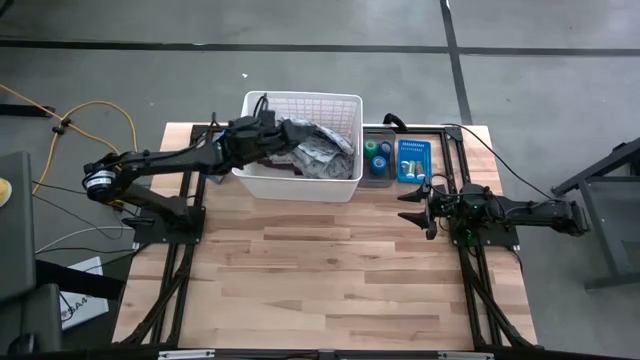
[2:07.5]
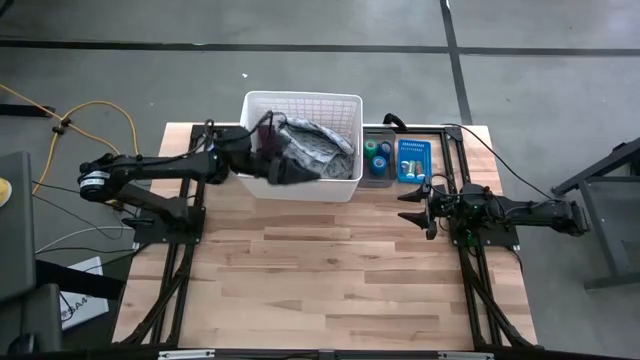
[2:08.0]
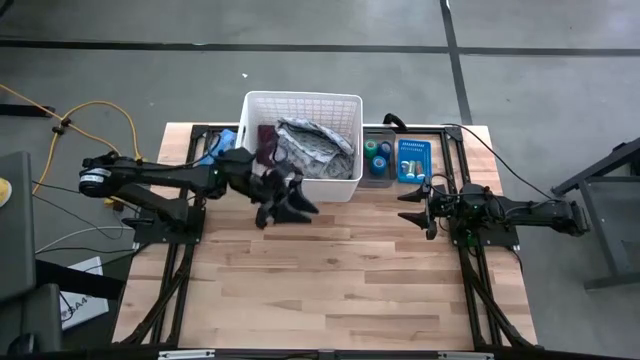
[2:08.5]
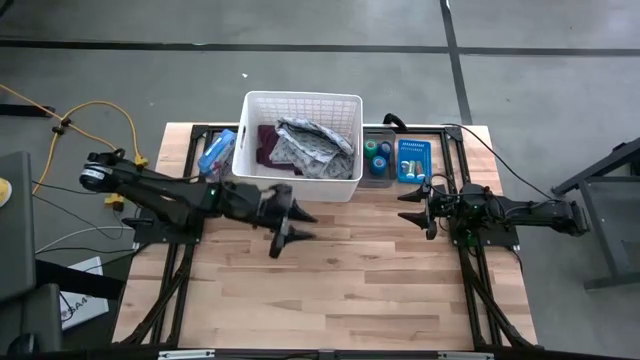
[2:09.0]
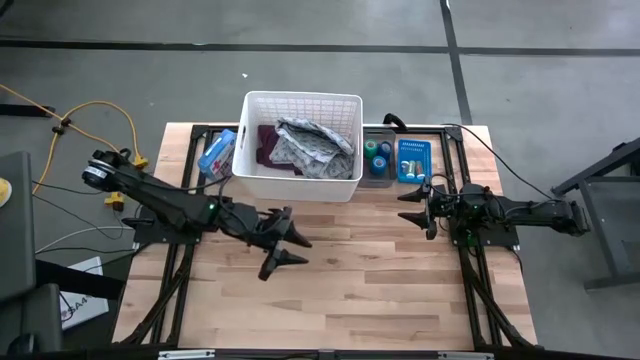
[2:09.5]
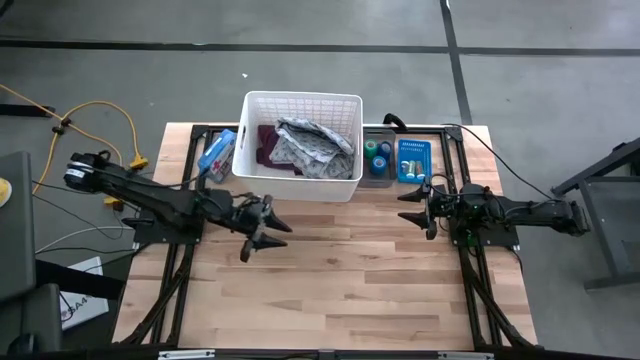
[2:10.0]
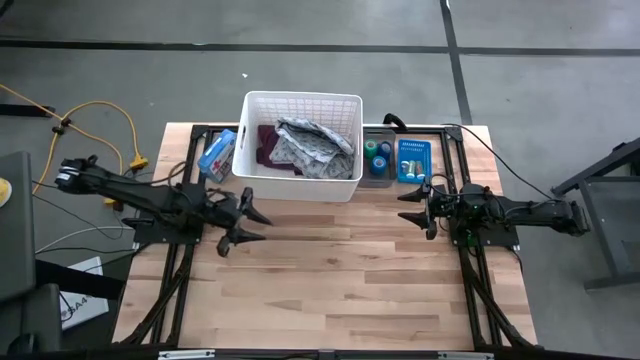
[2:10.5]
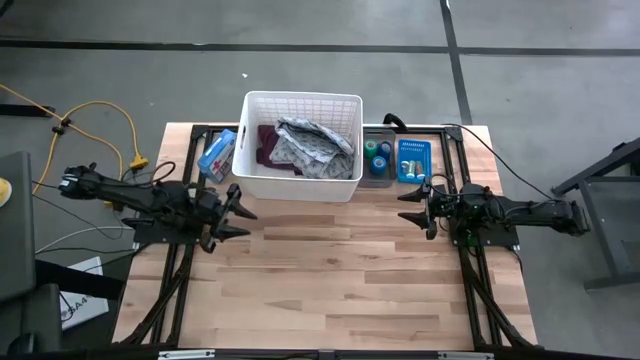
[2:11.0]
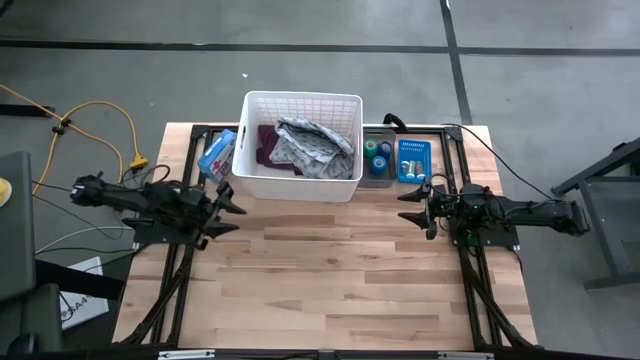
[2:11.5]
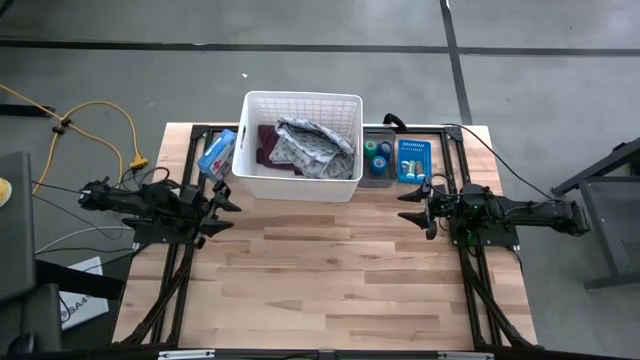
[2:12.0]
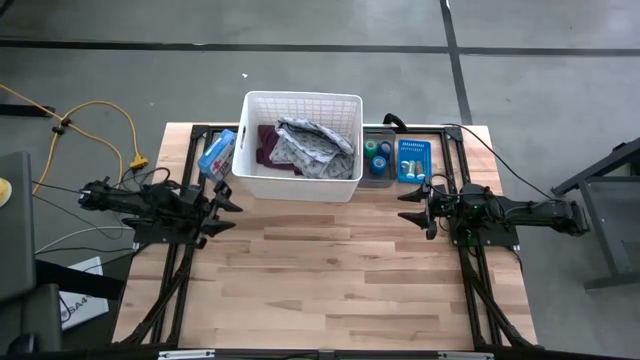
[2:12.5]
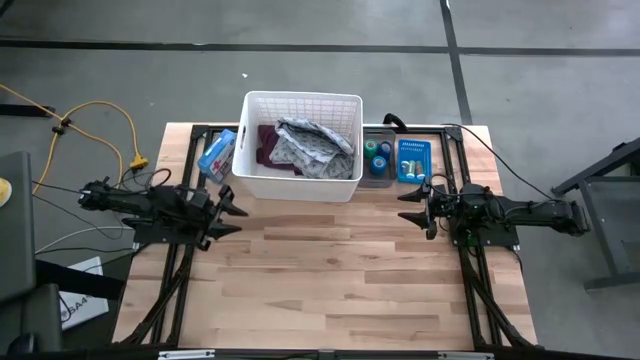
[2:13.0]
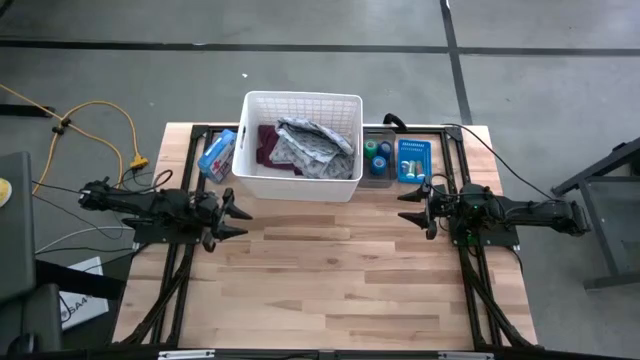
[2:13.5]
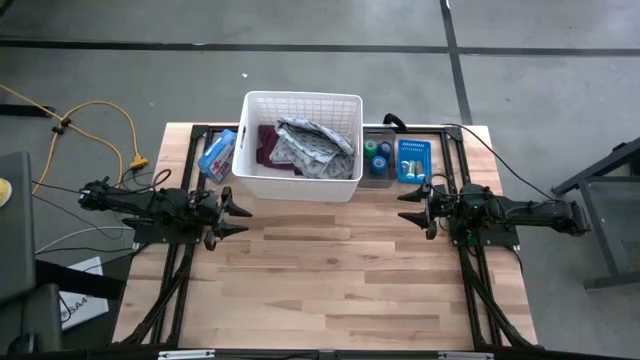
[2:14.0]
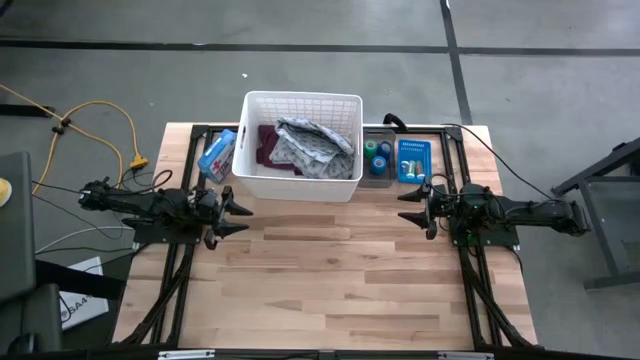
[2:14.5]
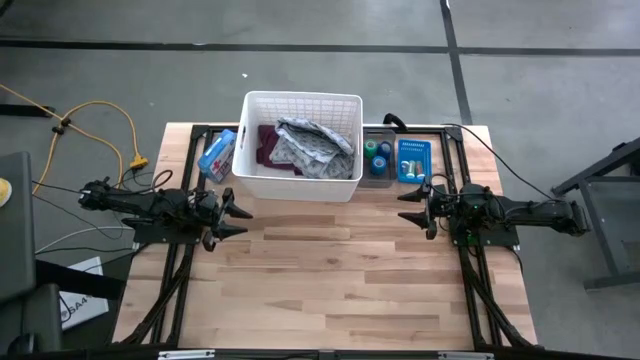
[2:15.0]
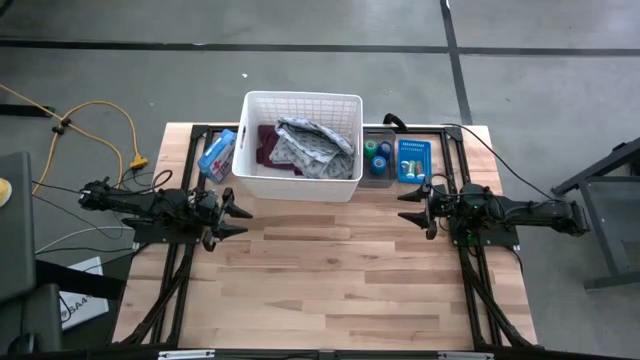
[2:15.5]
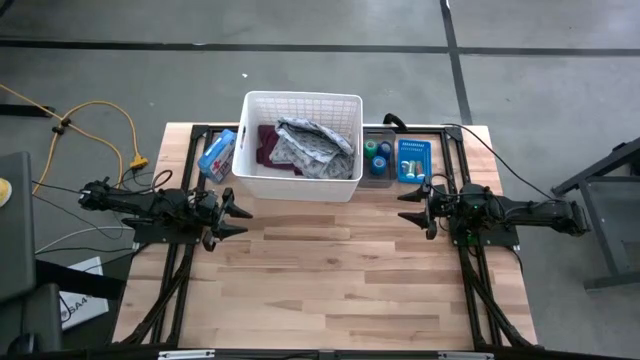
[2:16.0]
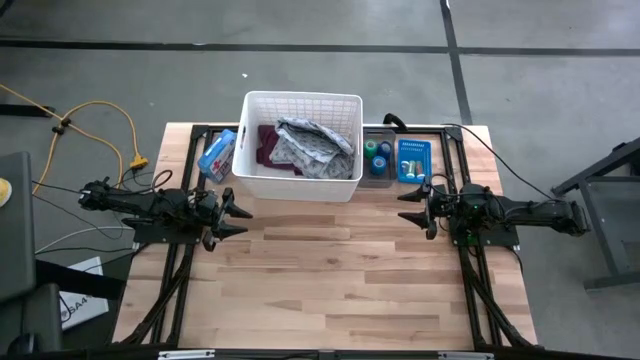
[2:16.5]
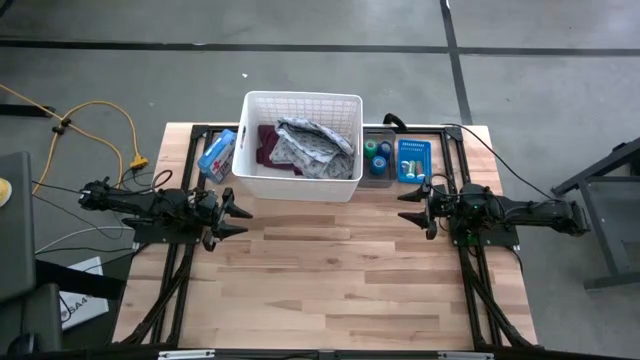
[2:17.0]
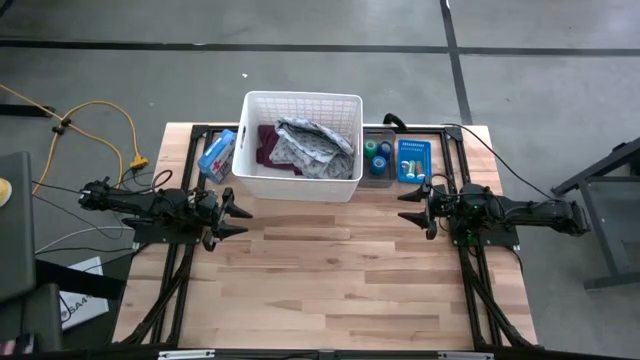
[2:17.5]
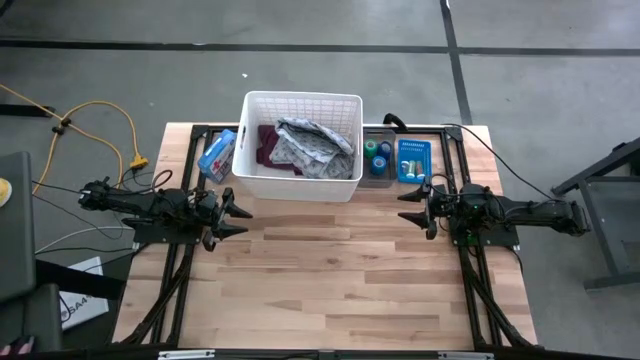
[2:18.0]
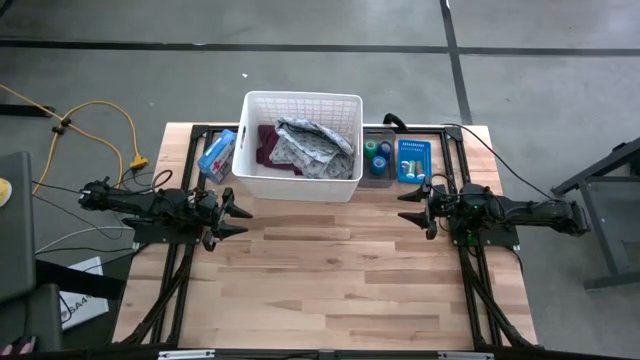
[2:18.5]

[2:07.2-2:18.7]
Task: Pick & Place Medicine items
Return to Home Position

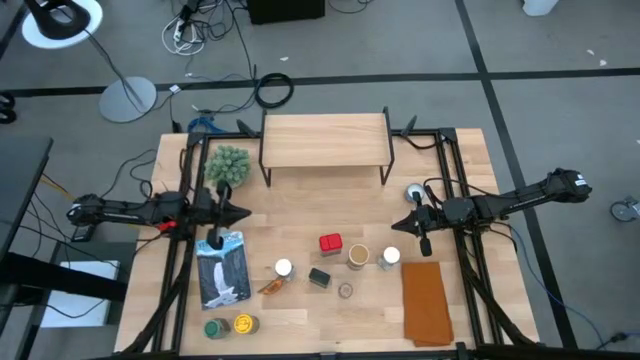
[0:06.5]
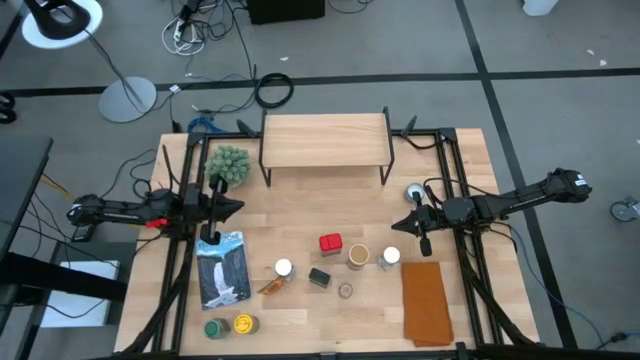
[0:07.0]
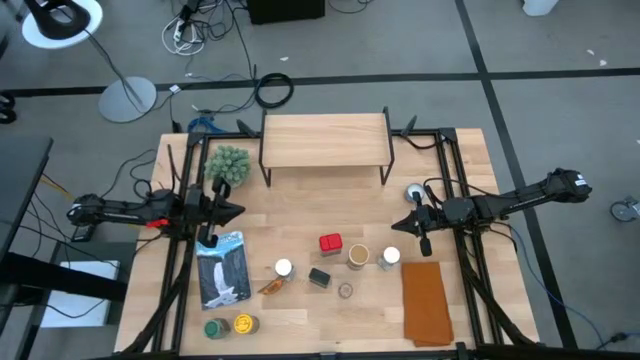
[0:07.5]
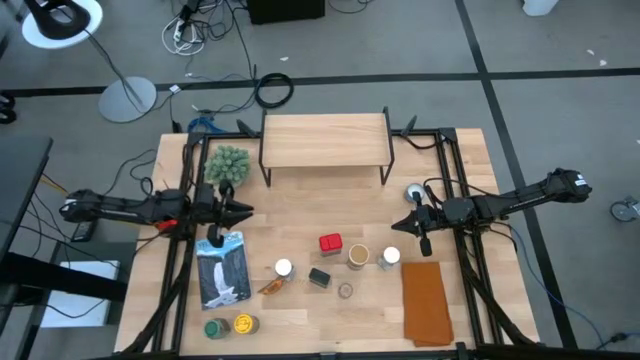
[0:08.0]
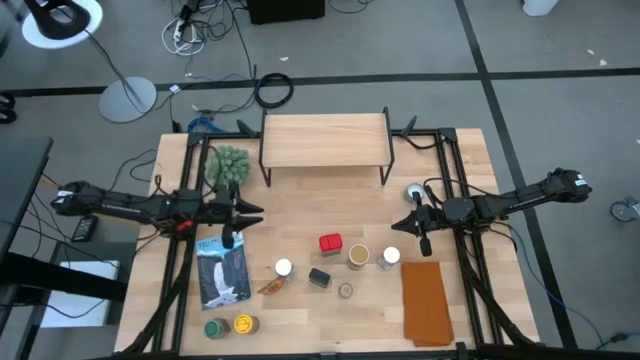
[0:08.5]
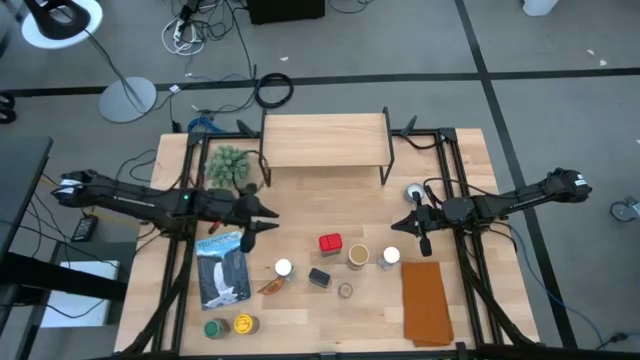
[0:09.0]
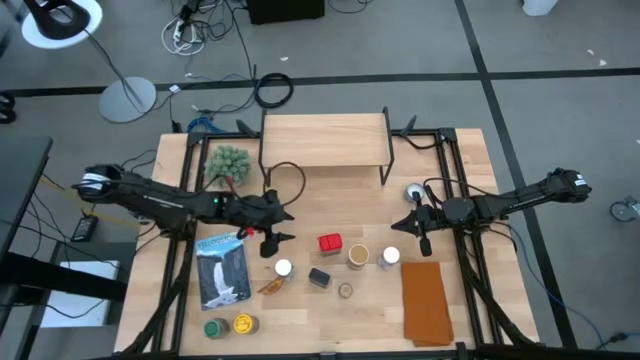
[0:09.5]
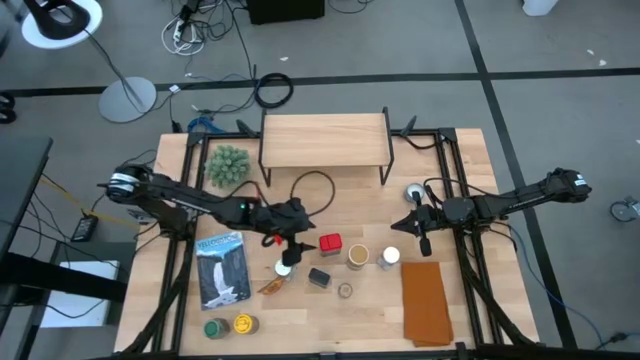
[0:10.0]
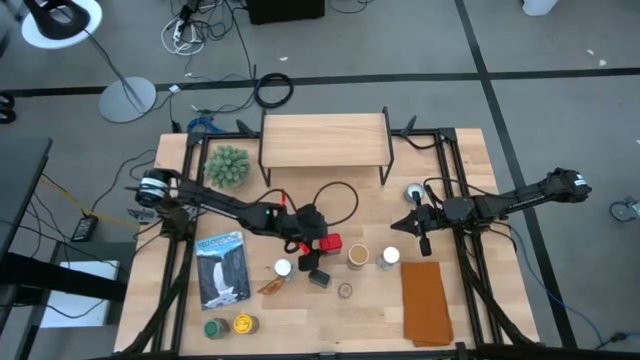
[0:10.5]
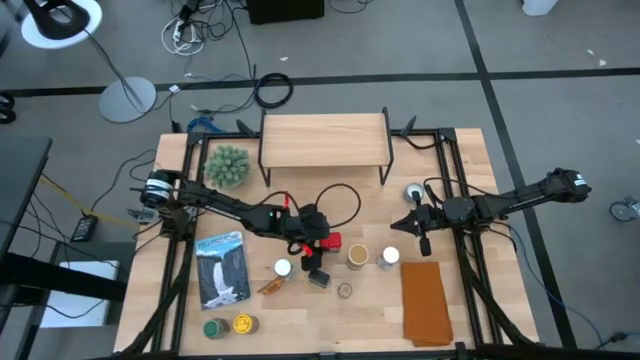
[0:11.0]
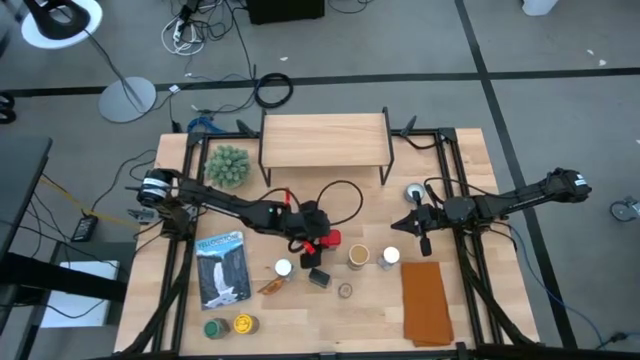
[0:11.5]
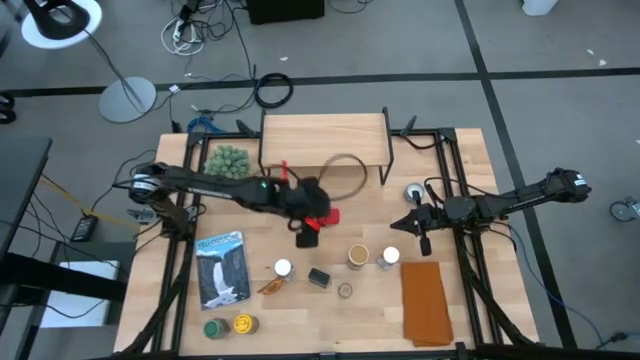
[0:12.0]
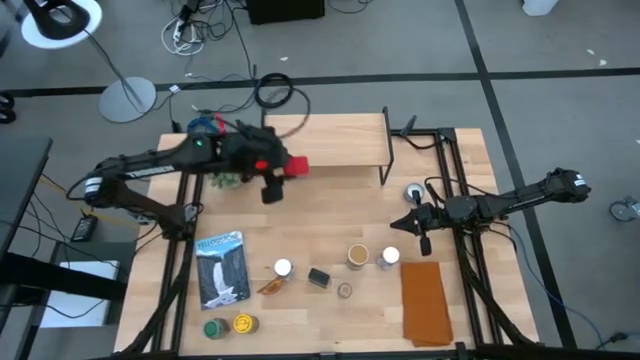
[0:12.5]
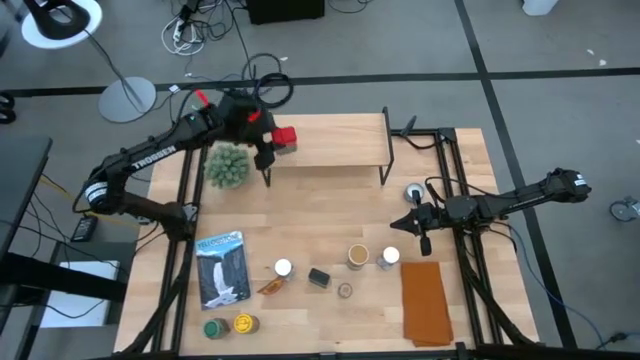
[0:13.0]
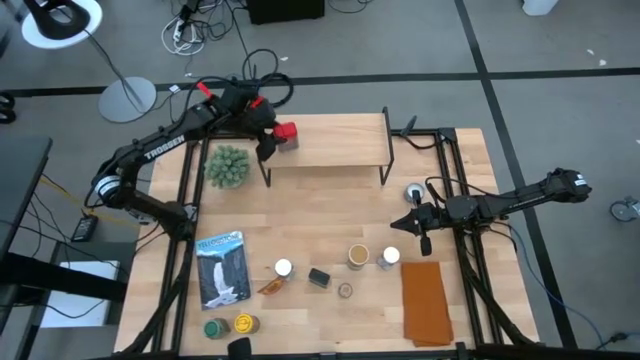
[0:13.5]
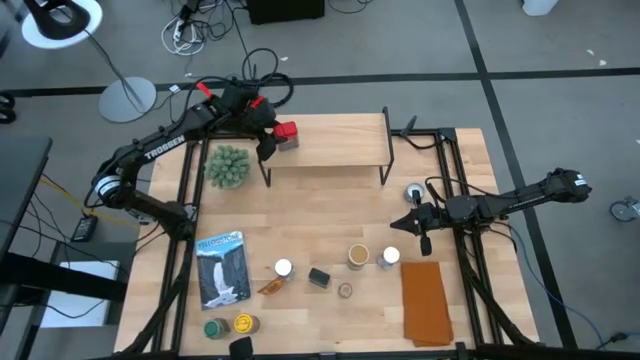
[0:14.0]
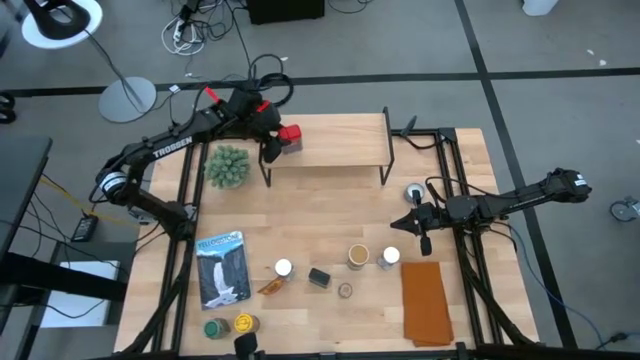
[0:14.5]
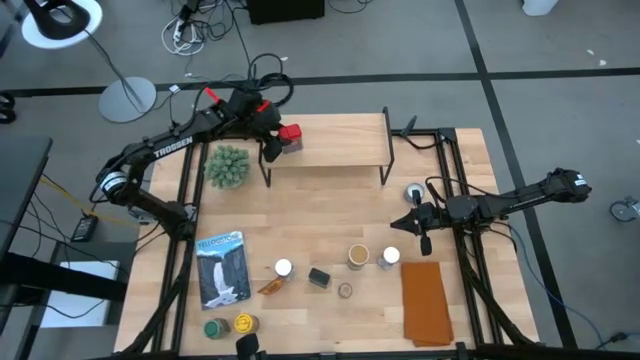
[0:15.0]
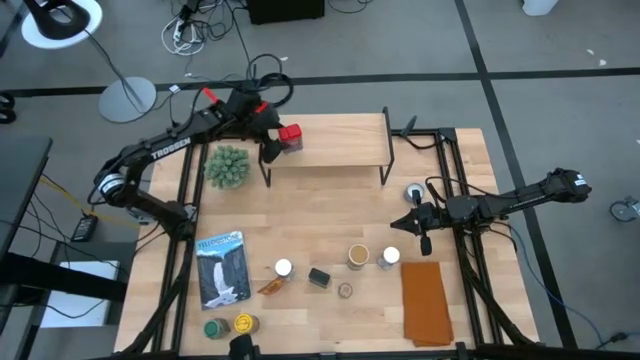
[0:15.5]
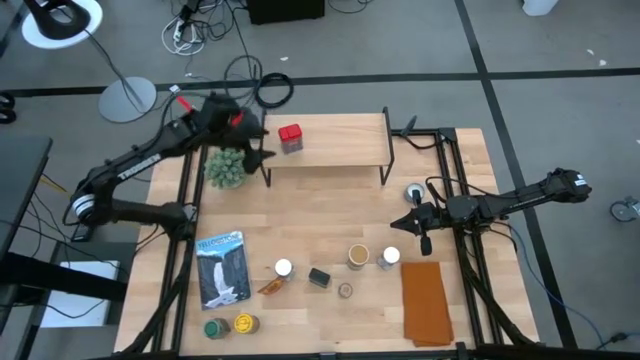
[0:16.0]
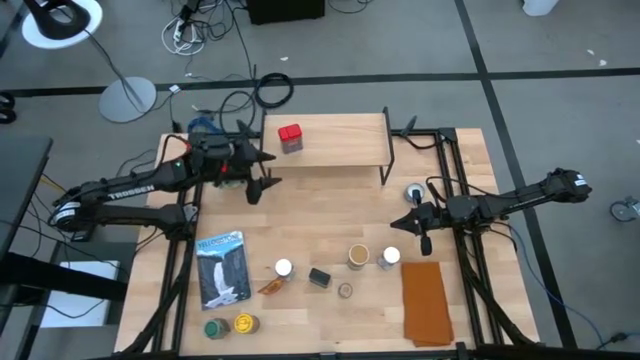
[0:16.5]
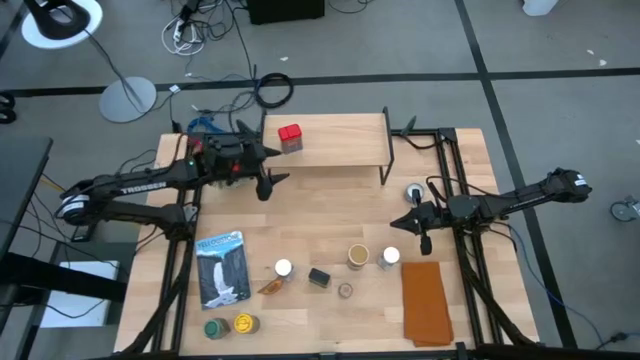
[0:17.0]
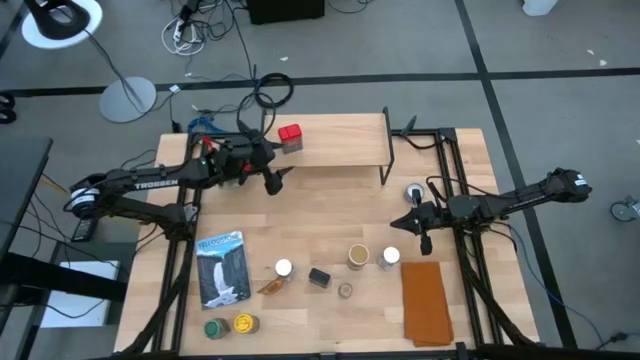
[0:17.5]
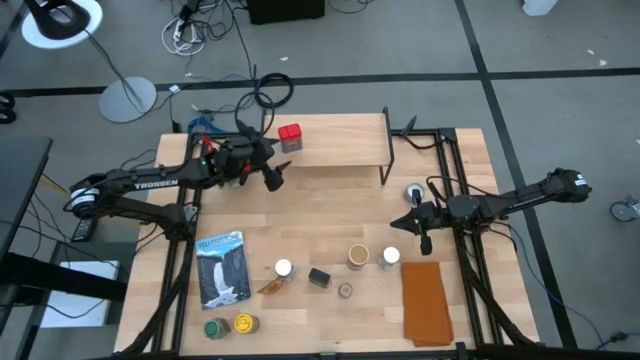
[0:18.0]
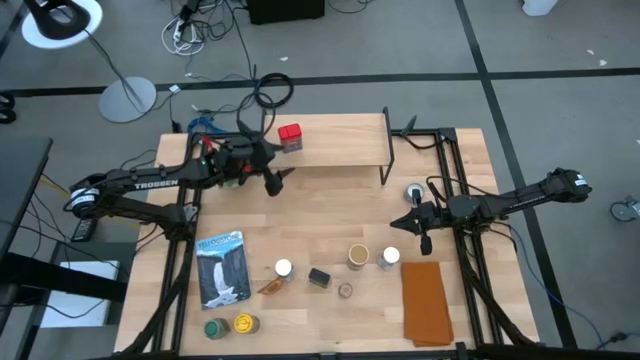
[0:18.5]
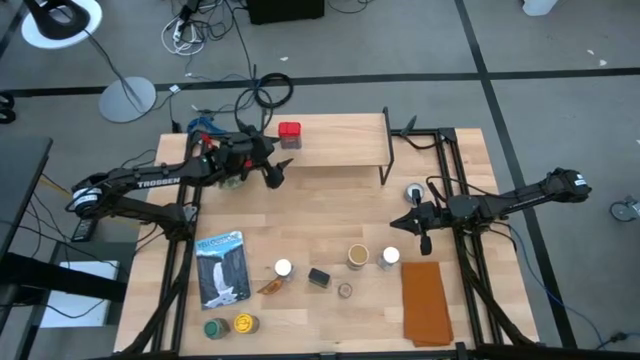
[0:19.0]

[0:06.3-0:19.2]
Task: Shelf spices
Put the red seasoning can on the shelf
